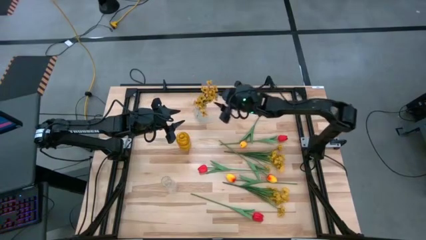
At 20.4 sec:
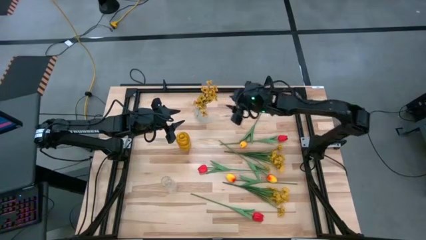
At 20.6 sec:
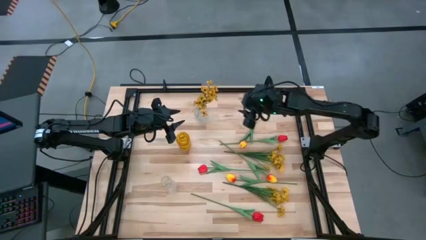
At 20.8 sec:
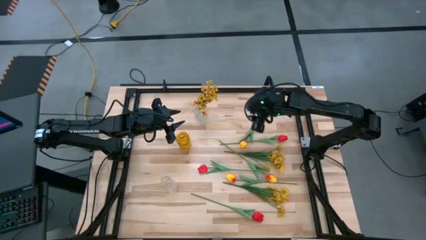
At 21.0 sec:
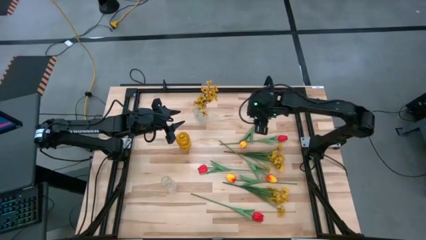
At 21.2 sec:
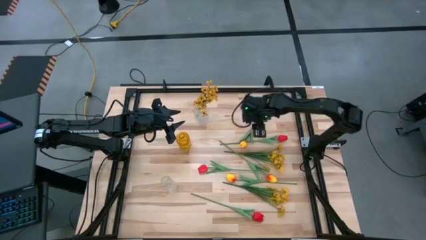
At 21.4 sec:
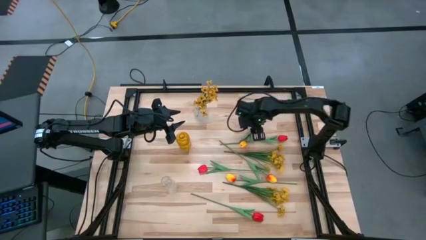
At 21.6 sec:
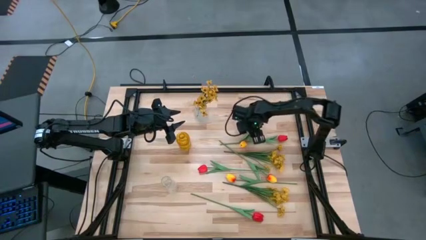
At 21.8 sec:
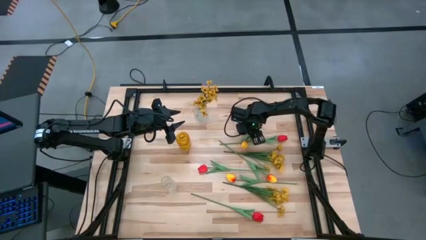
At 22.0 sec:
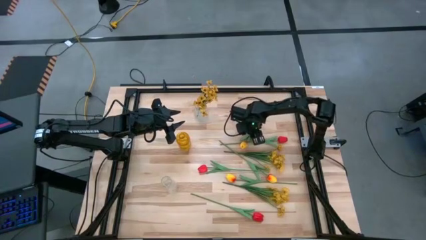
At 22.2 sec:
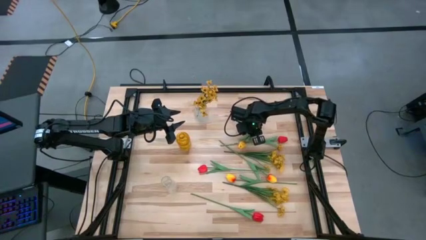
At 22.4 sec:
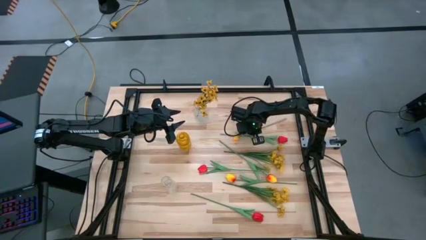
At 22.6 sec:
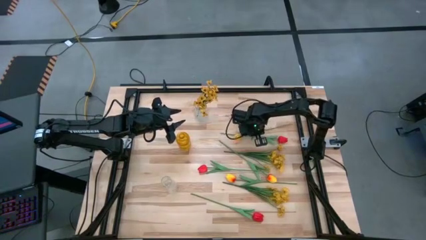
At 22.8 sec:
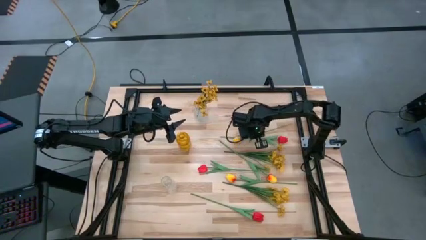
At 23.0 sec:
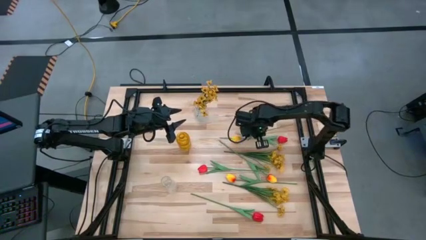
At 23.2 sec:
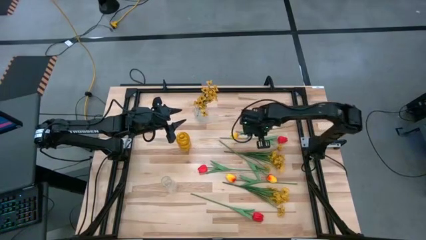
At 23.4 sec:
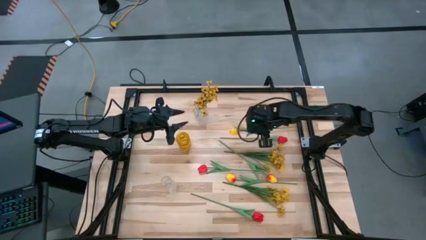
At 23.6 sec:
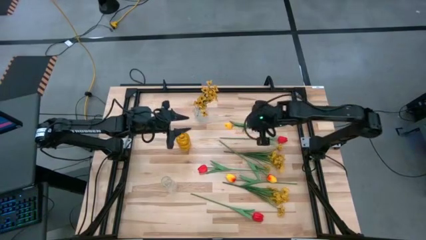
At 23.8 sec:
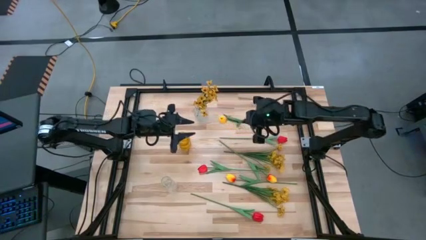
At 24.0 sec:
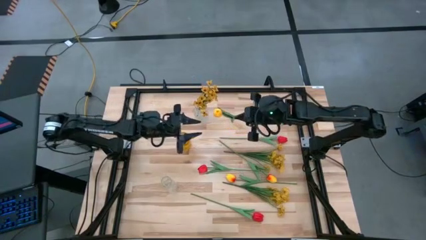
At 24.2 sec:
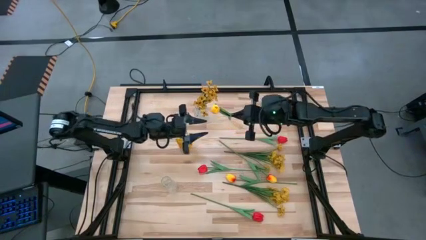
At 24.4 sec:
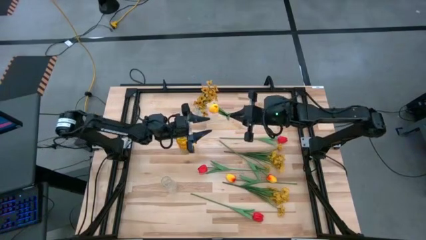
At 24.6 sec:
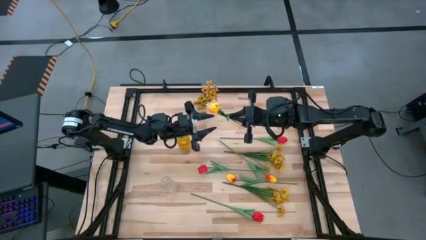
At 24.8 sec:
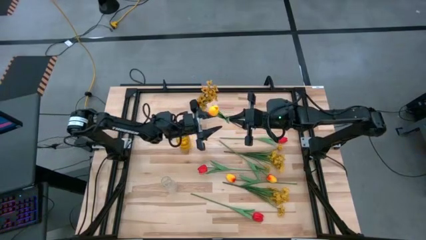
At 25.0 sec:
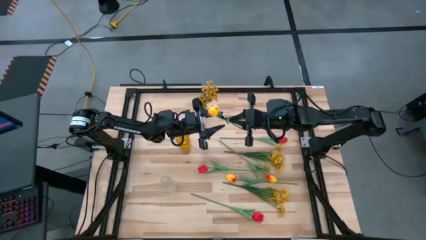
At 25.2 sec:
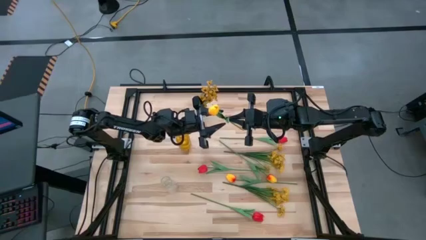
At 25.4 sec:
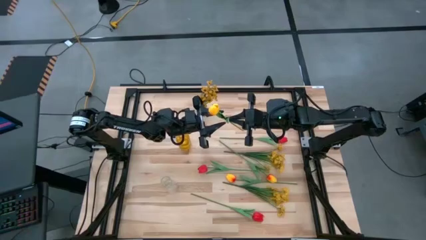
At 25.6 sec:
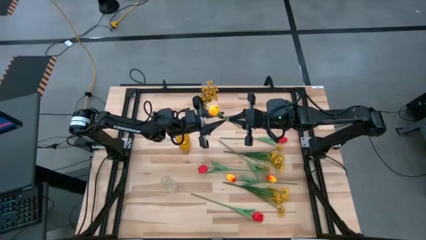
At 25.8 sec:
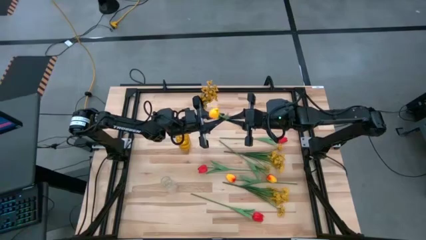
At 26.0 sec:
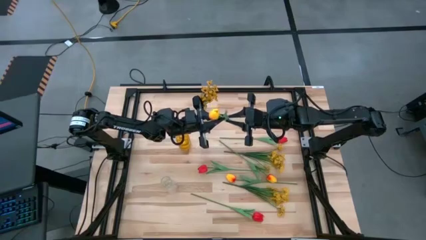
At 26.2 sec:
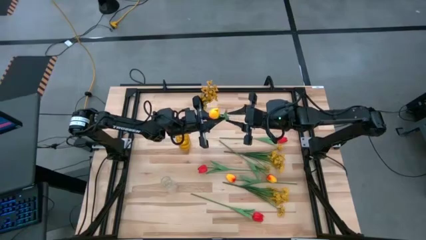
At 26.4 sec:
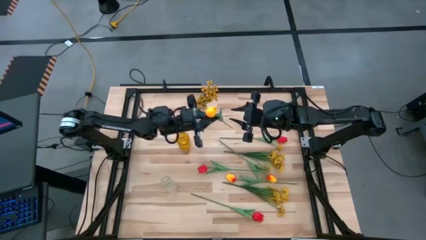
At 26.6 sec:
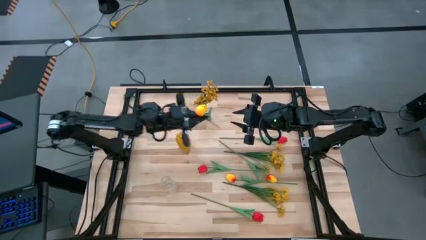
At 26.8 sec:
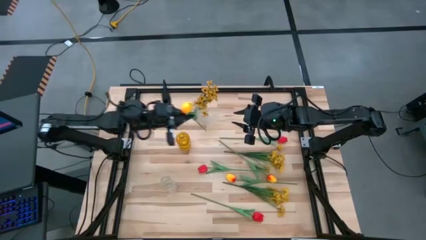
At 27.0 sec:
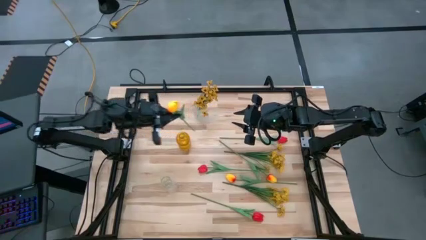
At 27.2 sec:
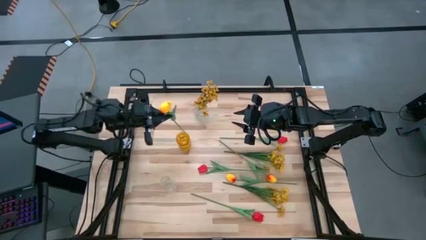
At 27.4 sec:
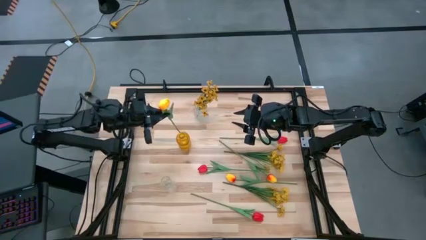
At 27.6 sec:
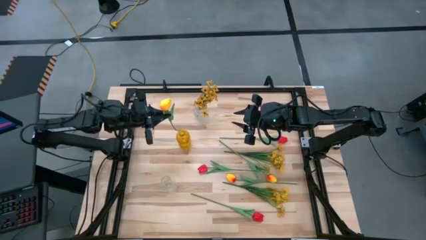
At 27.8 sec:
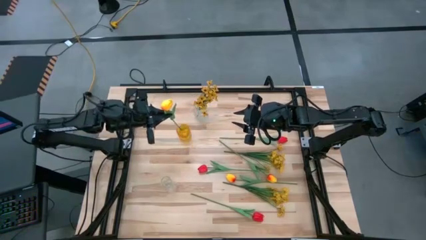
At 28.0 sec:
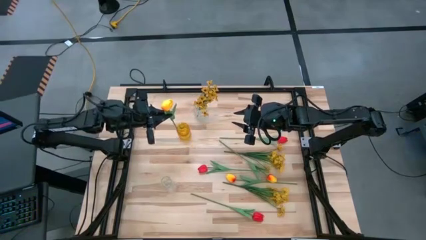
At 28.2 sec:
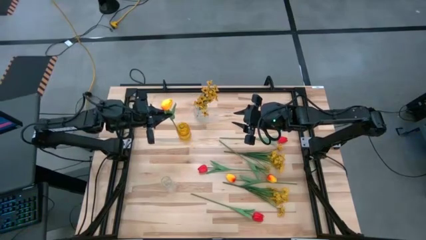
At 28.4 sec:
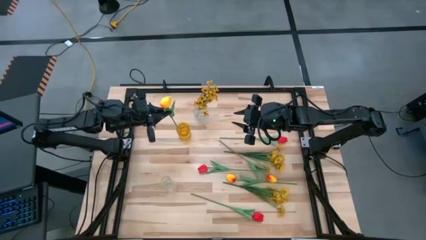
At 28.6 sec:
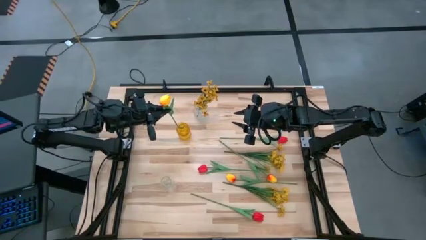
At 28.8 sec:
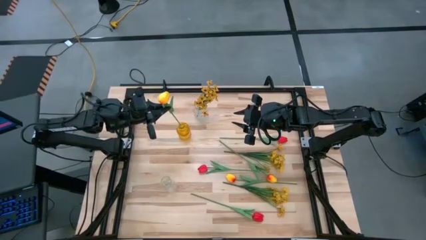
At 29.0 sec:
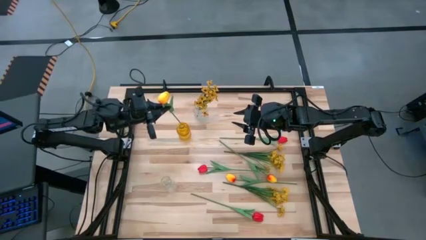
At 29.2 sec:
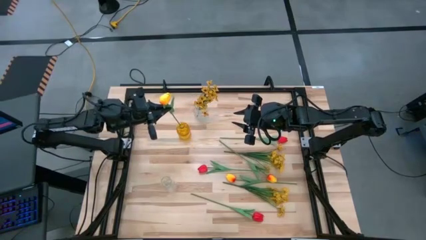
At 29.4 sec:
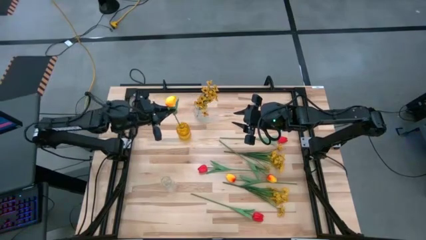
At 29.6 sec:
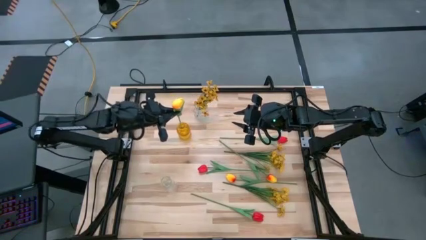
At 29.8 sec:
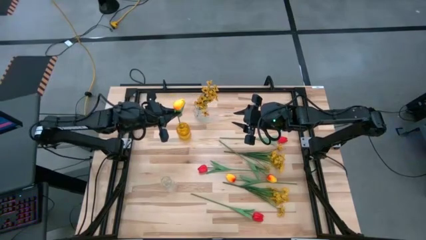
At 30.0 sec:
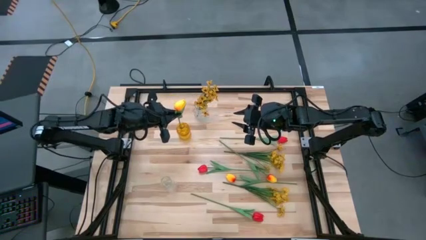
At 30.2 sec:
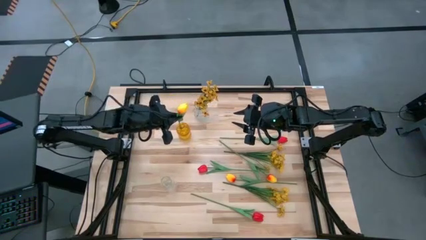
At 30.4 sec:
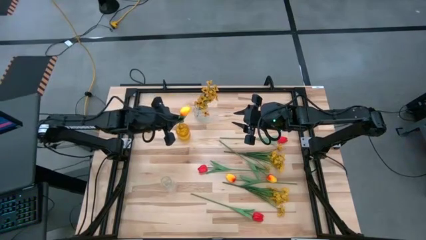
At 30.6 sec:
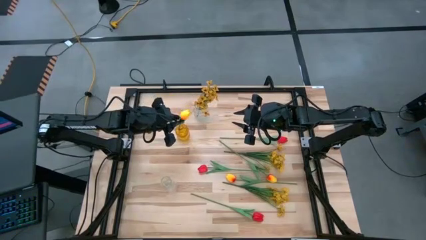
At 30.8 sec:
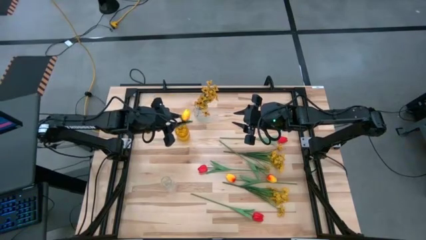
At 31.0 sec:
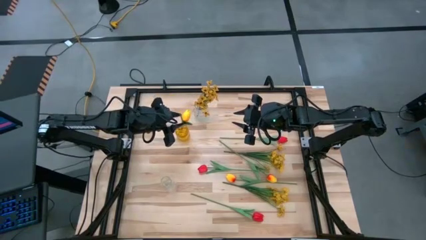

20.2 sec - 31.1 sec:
Task: Sort flowers into vase by color
Put the top yellow tulip into the yellow vase
